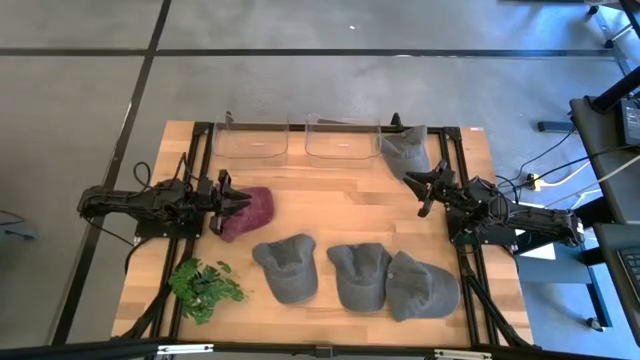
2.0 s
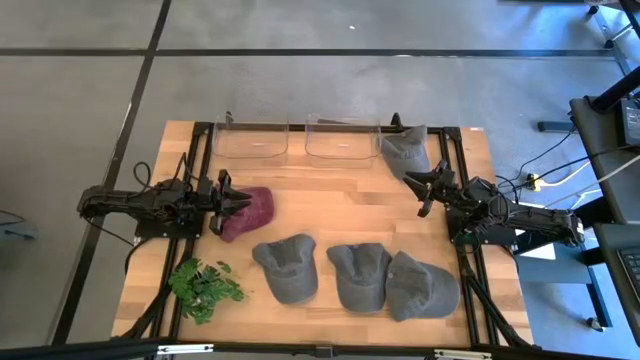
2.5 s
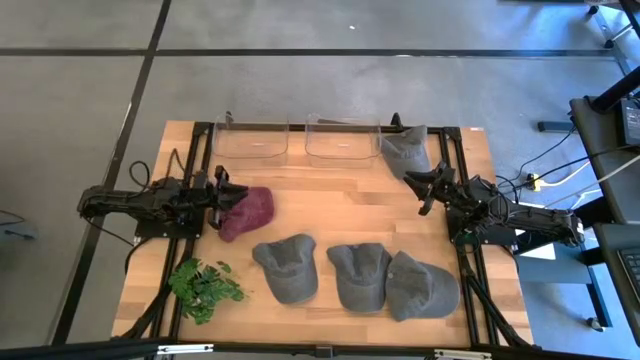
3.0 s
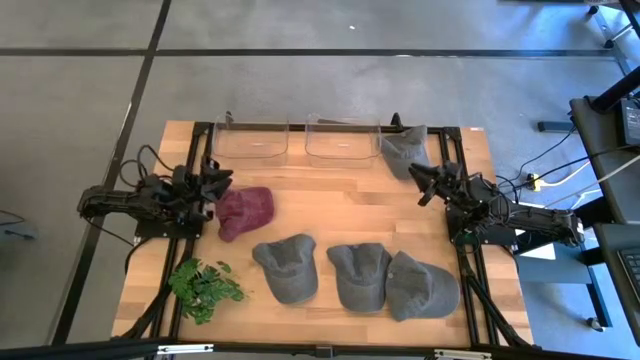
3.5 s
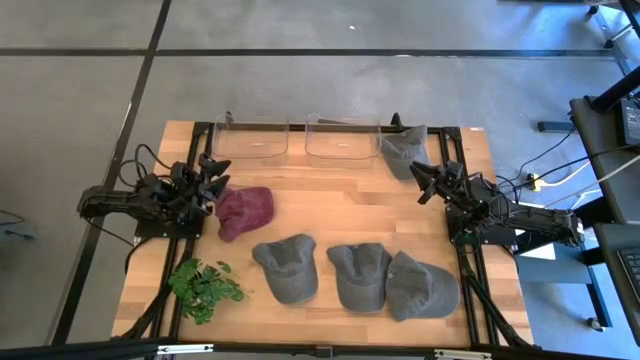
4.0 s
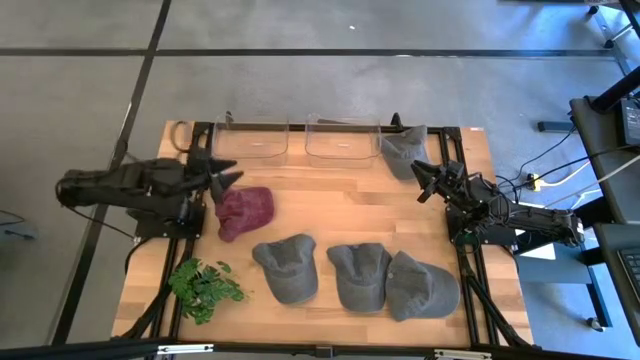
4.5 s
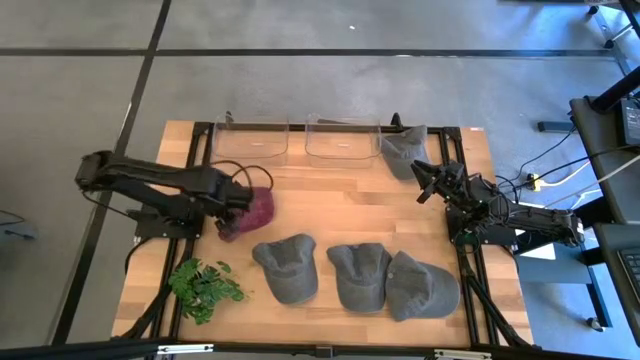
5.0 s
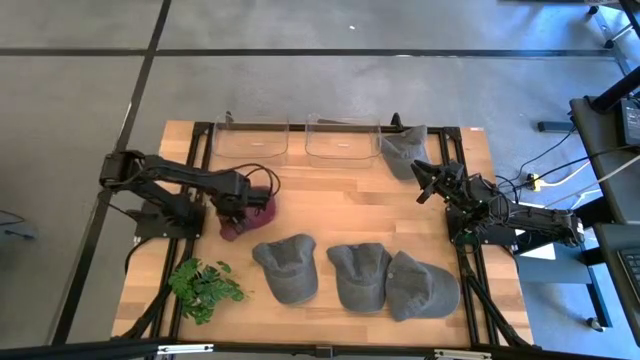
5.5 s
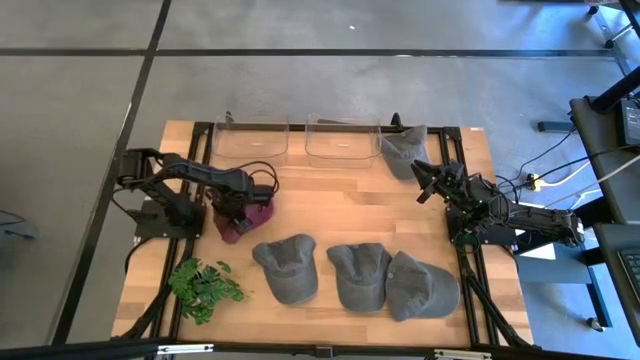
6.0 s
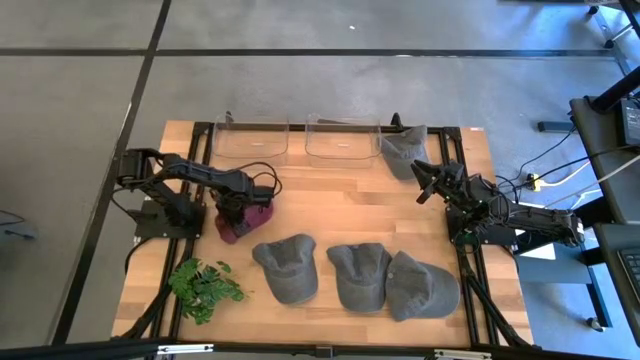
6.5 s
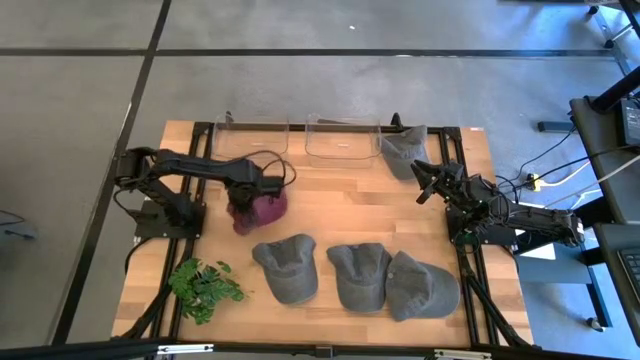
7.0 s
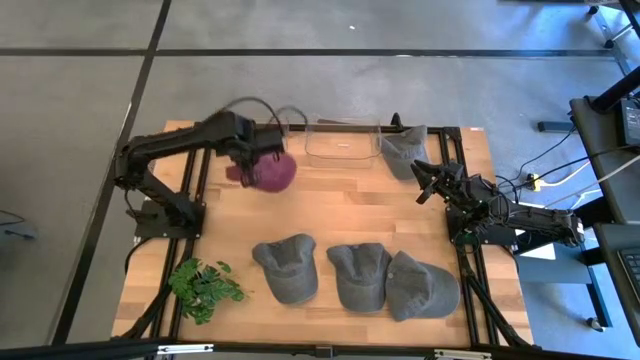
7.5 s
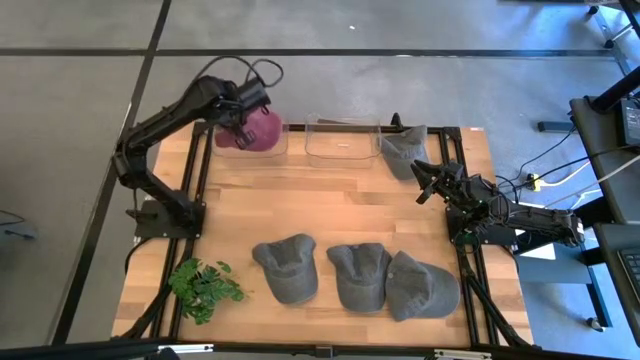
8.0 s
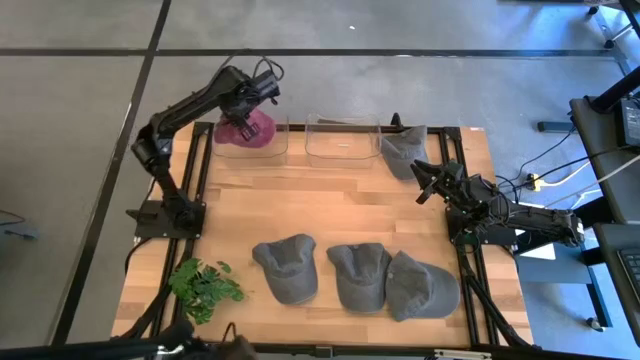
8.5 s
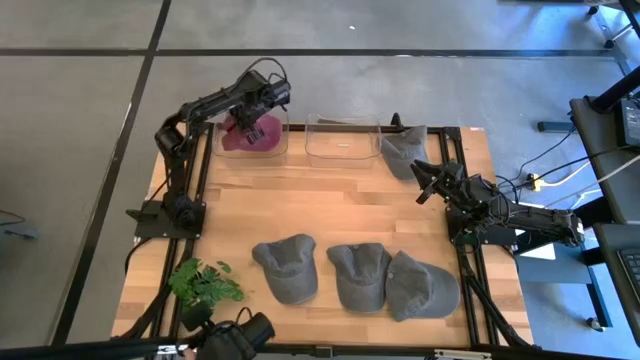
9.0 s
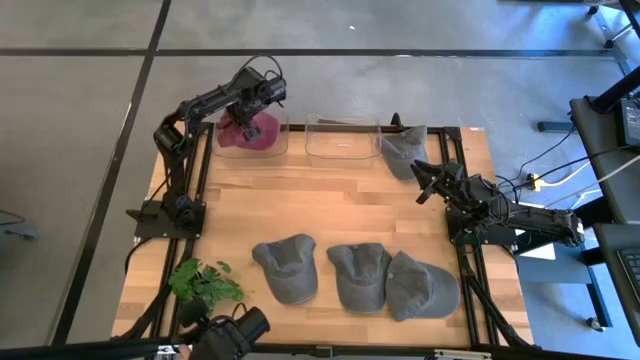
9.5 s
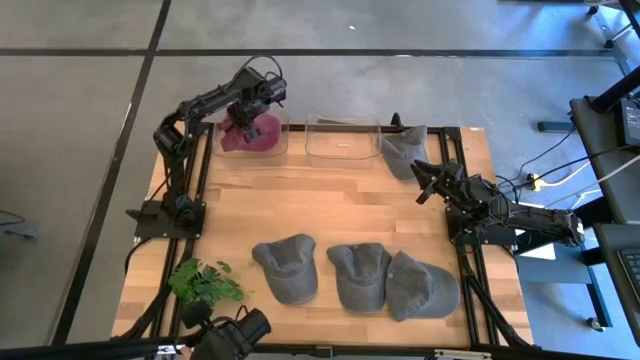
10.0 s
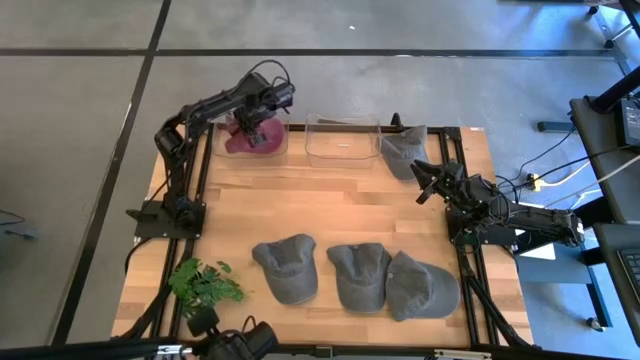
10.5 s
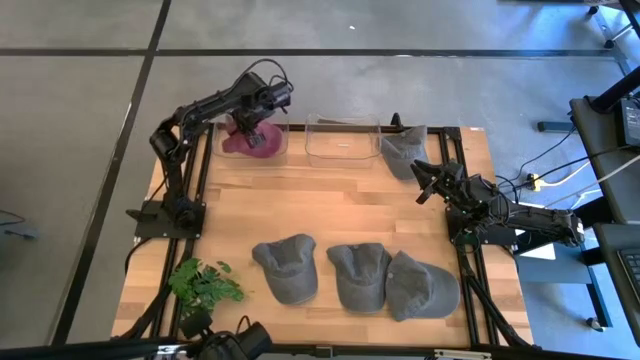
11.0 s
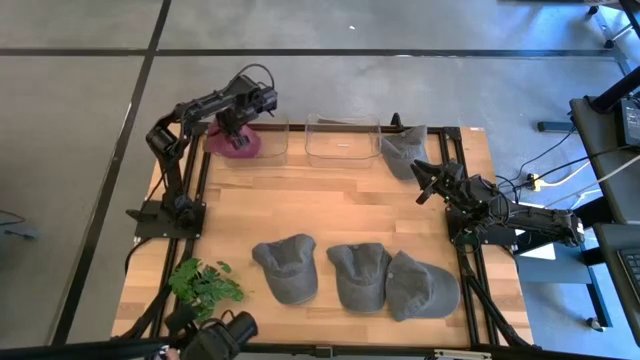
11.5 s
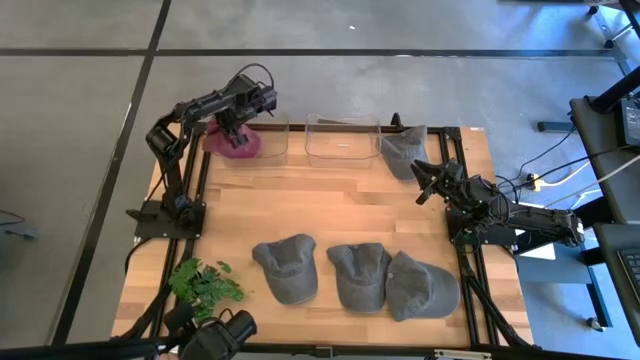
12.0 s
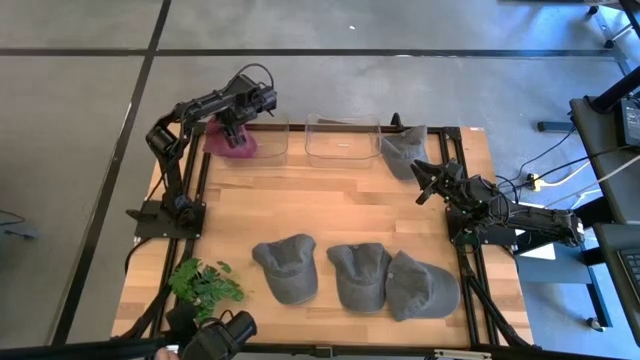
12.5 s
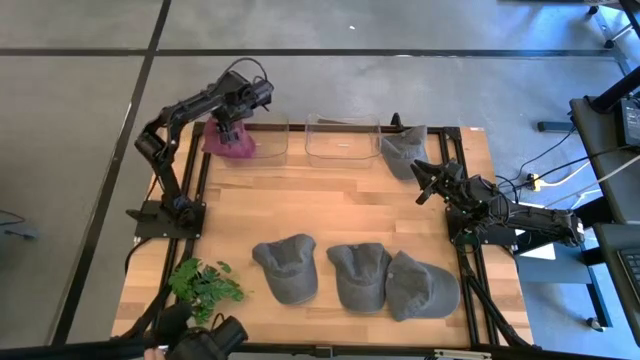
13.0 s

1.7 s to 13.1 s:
Task: Pick & Place hat
Put the dark red cap into the left transparent bin

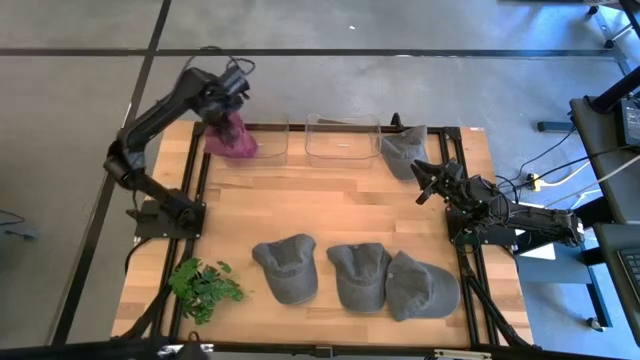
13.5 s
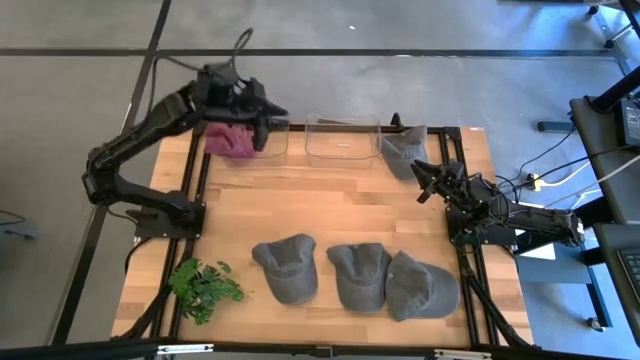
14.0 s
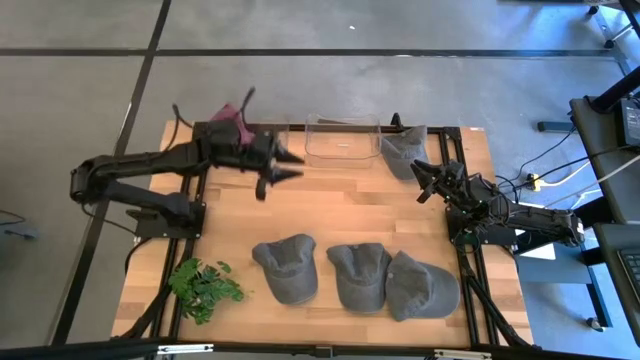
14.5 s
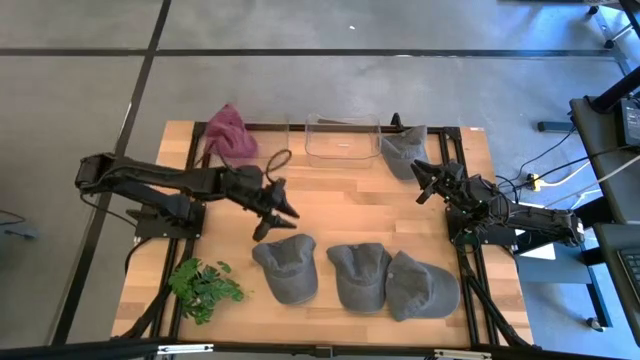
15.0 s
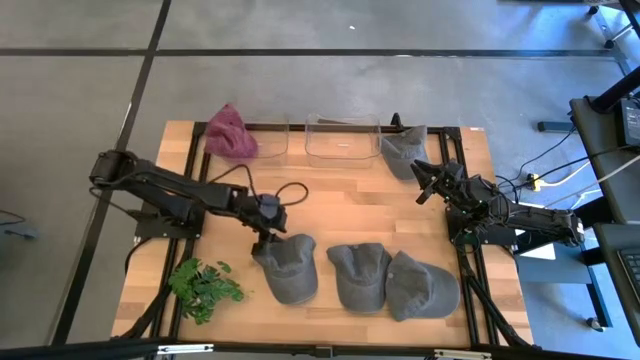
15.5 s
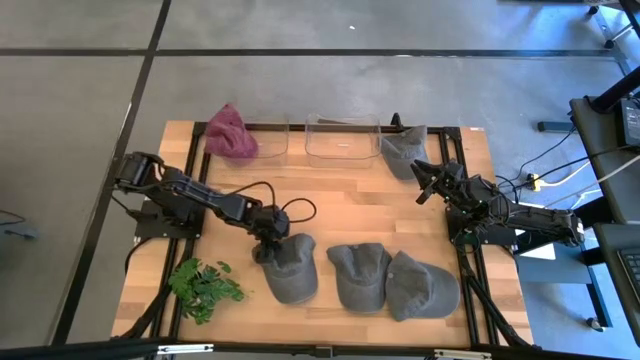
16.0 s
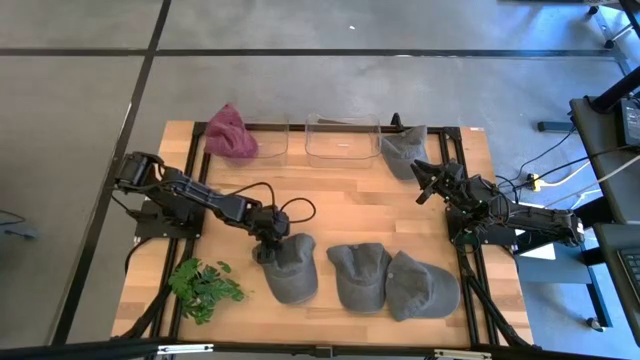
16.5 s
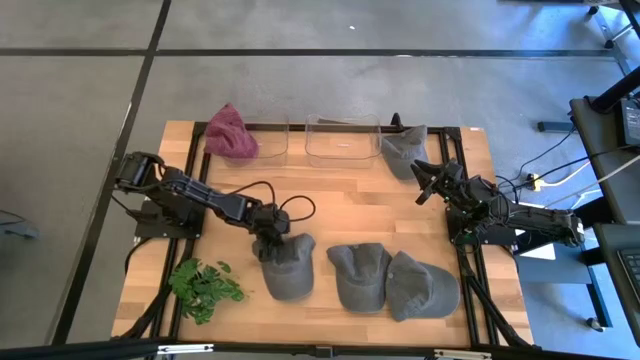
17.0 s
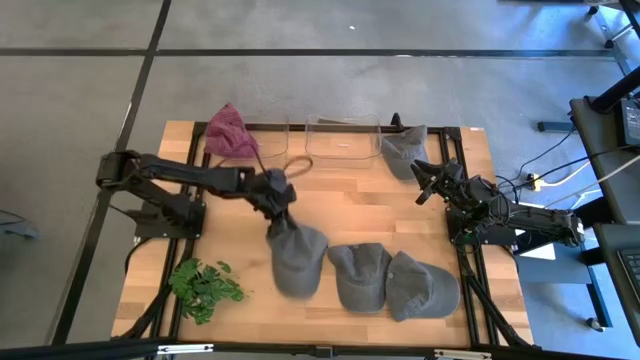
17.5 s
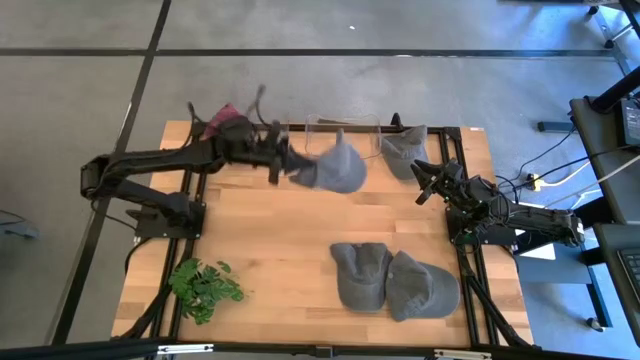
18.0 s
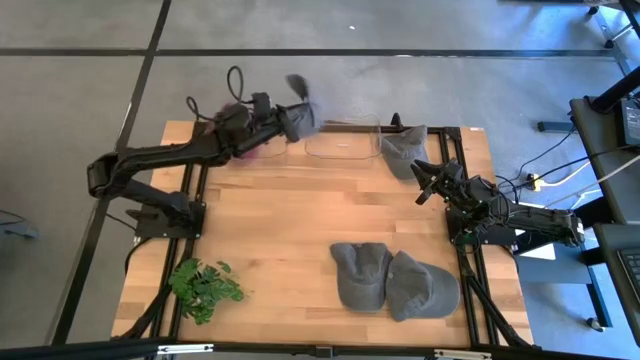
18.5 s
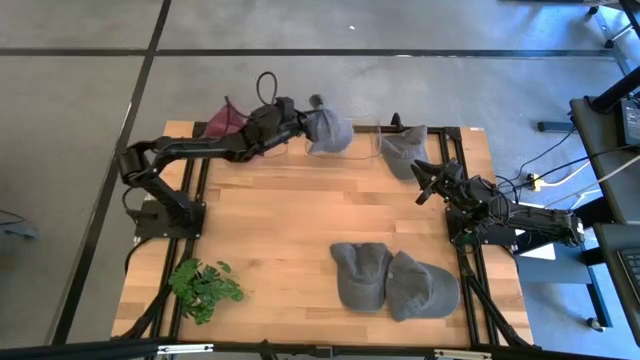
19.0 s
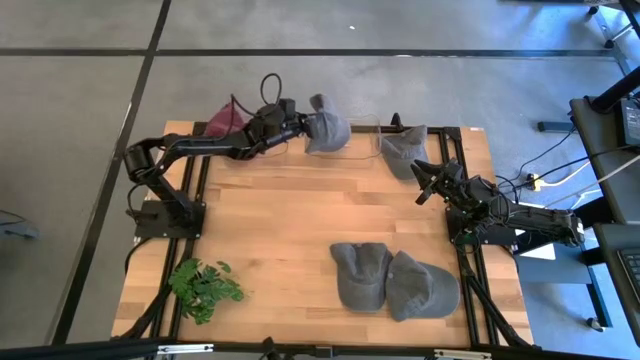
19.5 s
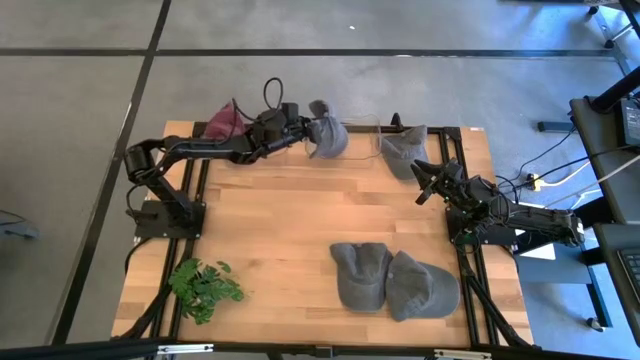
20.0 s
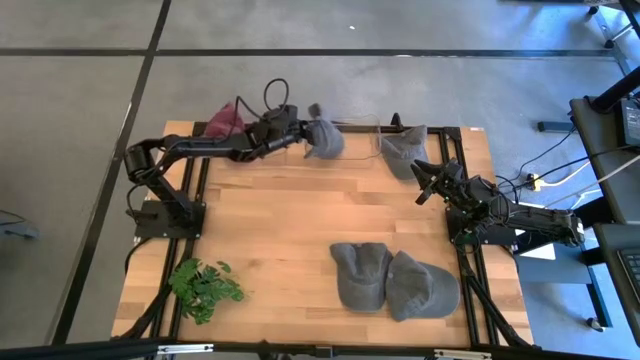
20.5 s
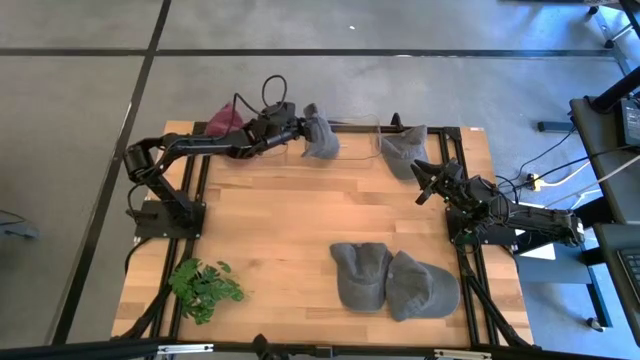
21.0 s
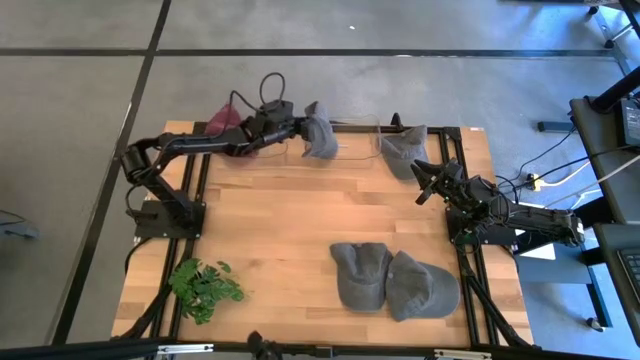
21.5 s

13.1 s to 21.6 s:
Put the gray cap into the right transparent bin
